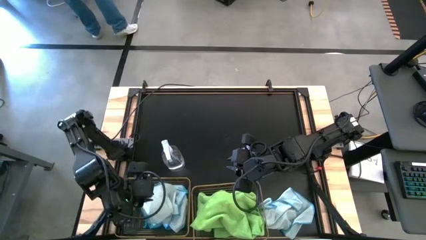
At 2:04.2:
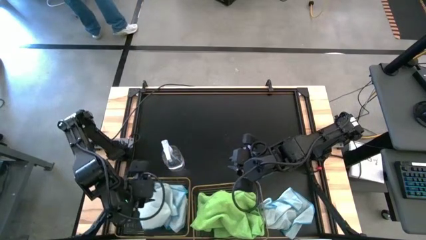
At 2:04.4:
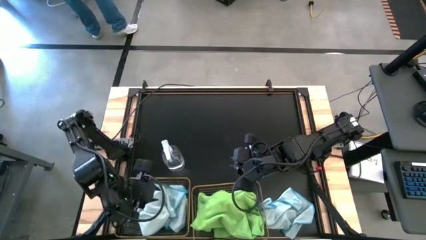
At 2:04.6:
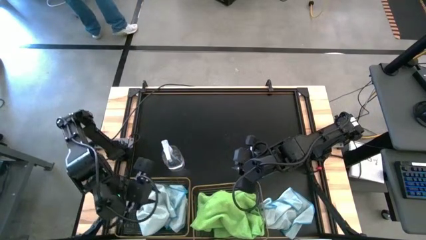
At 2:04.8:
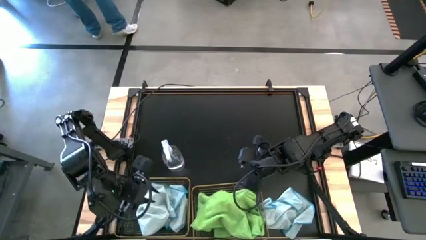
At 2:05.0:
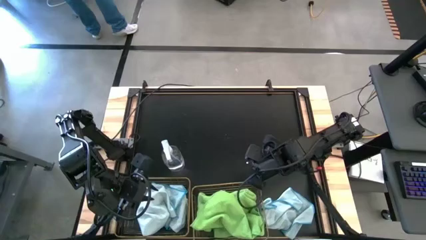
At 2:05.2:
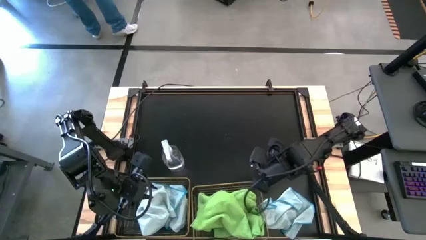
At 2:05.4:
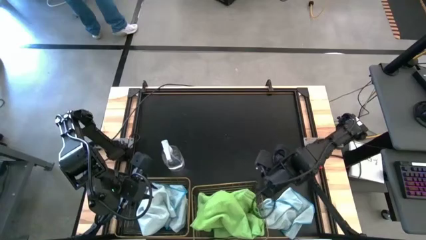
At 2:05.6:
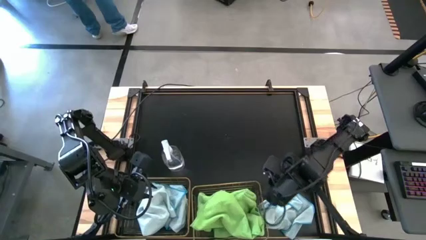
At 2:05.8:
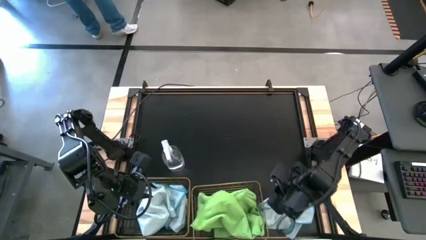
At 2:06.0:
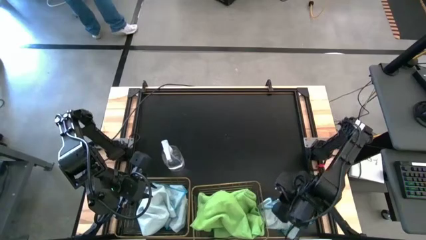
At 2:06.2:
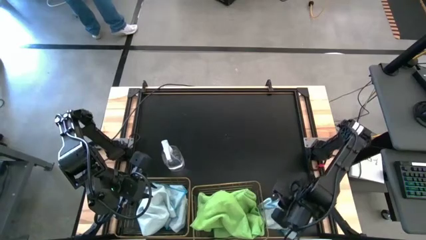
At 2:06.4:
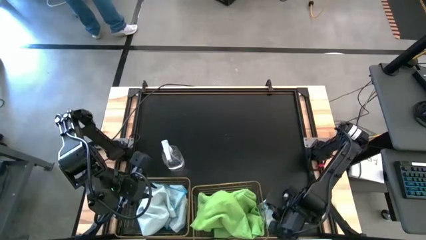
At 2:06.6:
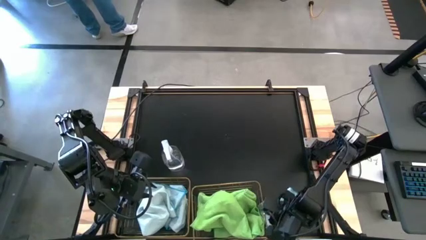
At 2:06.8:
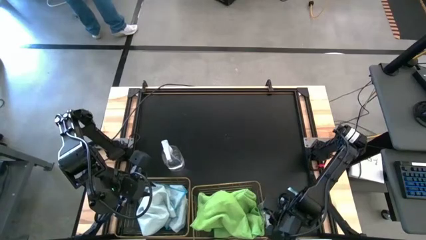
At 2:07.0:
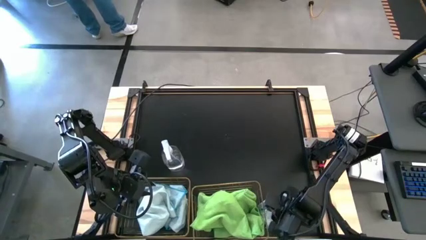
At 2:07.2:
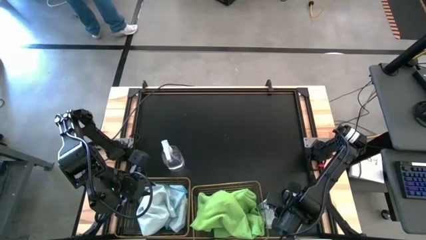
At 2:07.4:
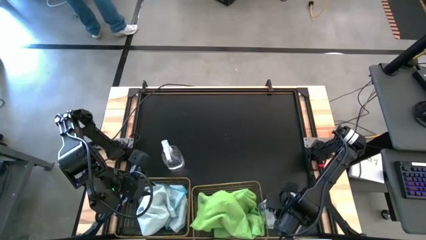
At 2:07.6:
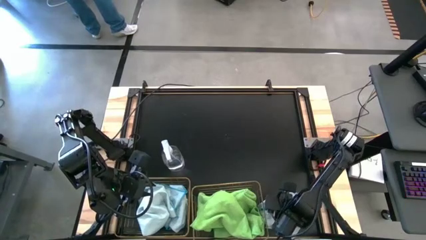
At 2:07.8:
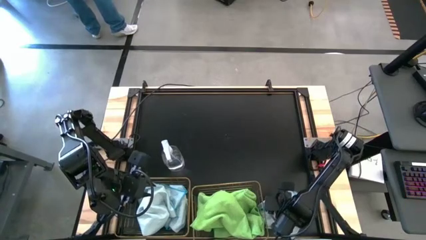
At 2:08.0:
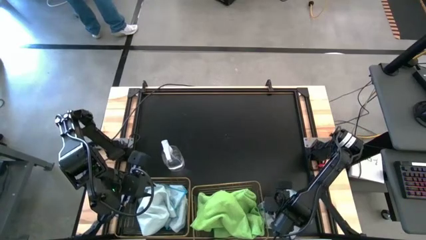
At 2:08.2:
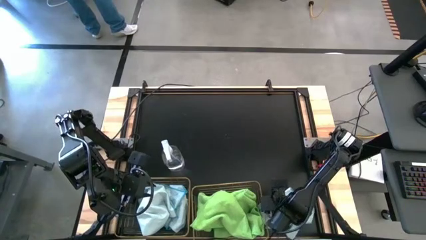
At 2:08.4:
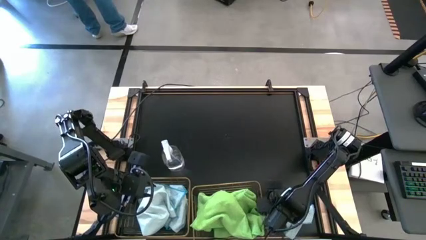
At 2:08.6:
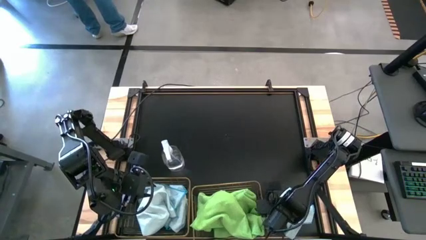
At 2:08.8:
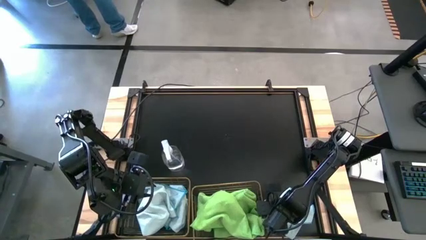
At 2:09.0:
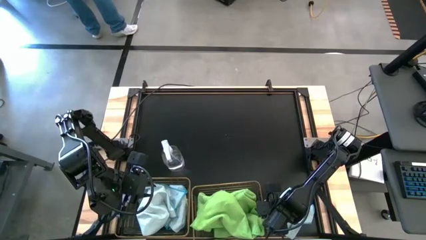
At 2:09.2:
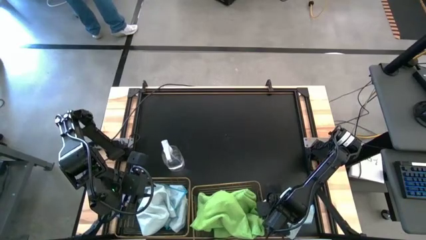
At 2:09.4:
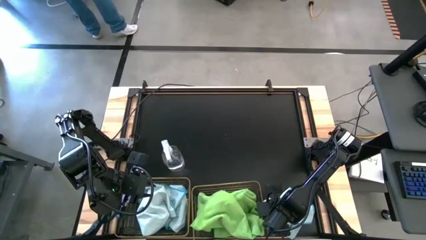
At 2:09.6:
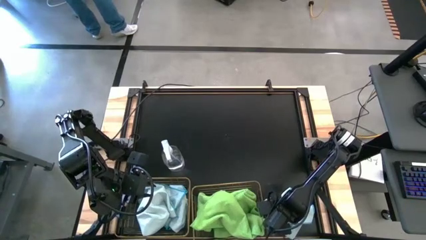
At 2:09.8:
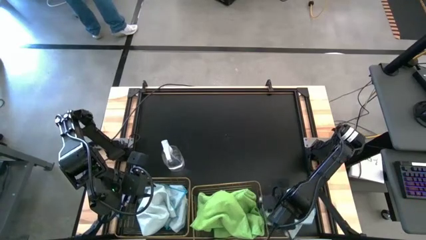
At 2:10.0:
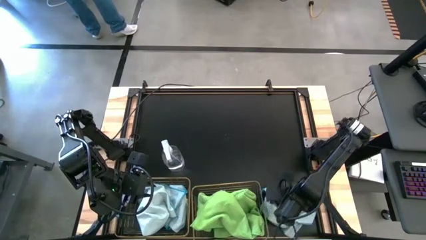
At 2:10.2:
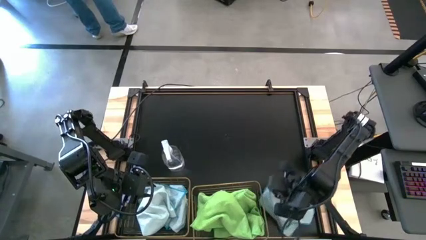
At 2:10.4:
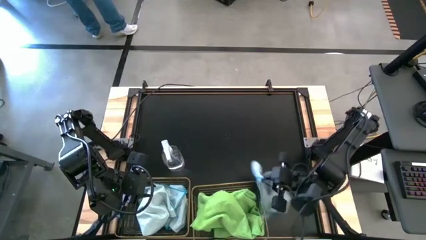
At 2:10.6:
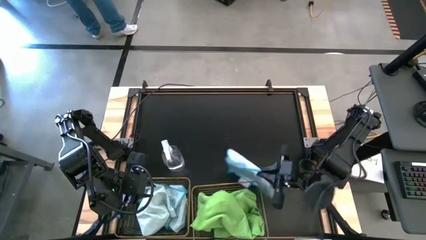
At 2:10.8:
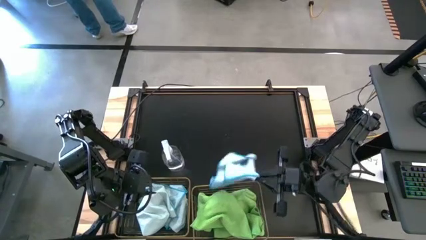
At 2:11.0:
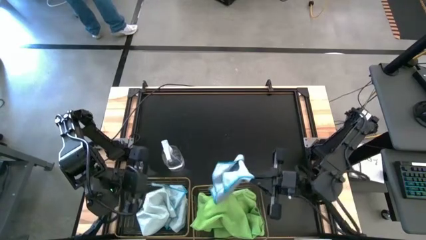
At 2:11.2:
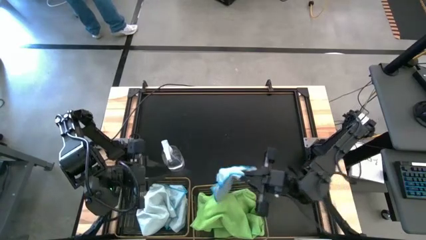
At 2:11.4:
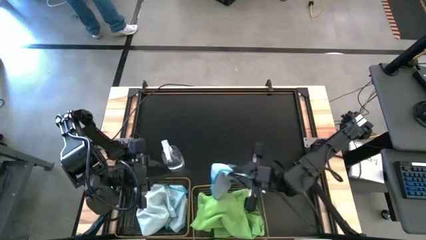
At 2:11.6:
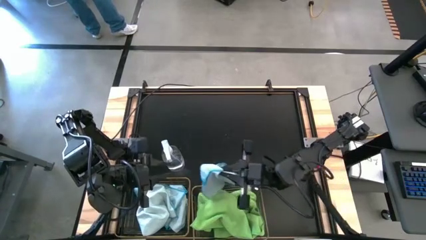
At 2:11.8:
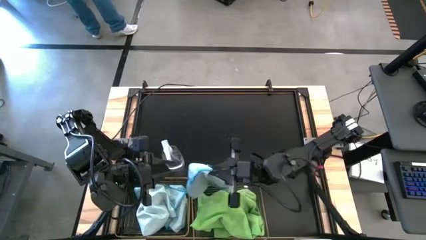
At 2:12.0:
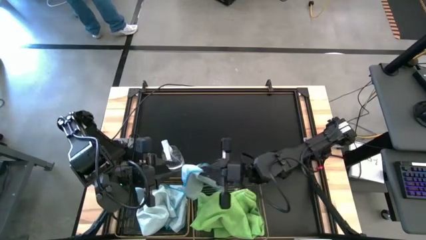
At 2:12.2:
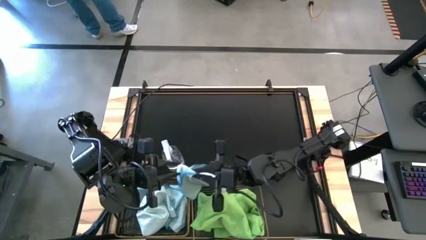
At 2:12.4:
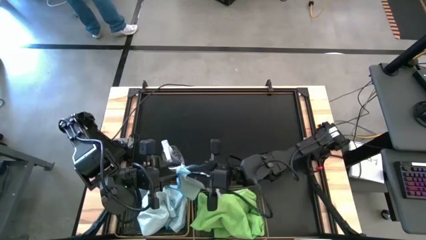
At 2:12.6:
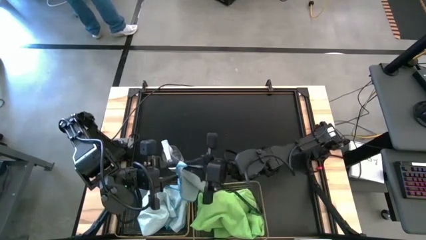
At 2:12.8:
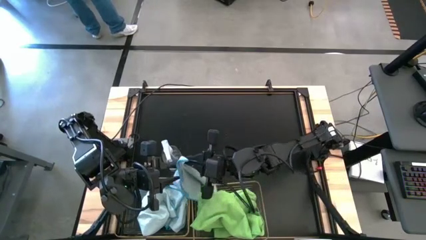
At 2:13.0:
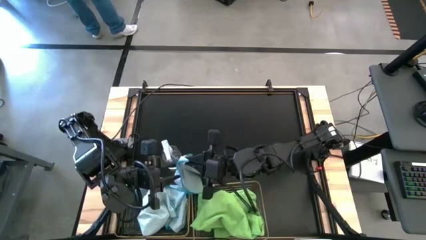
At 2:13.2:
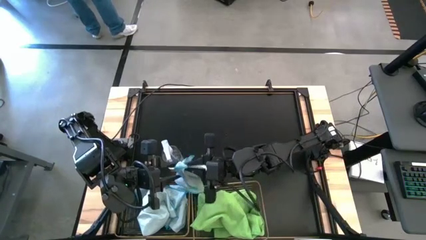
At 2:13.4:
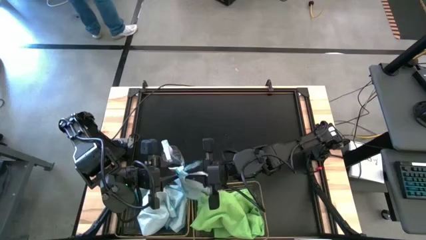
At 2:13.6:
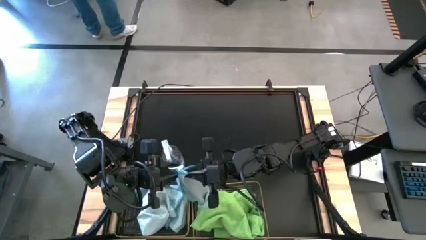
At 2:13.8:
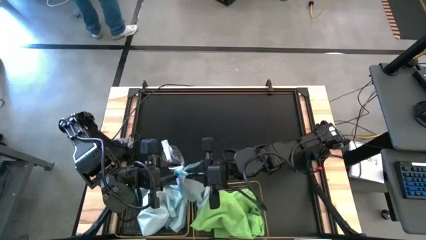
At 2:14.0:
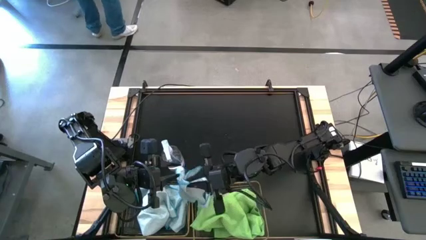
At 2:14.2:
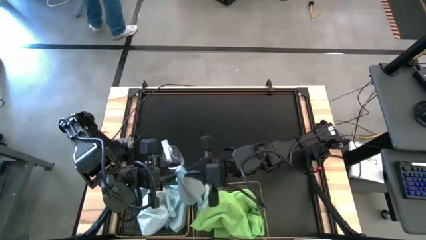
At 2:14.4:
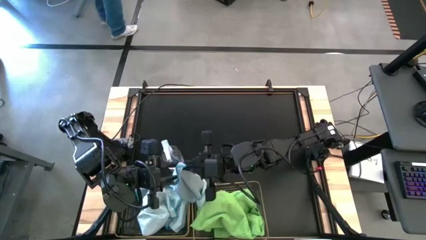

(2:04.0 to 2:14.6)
Task: Sort microfiber towel by color & place in baskets
Put the white microfiber cloth into the left wire basket

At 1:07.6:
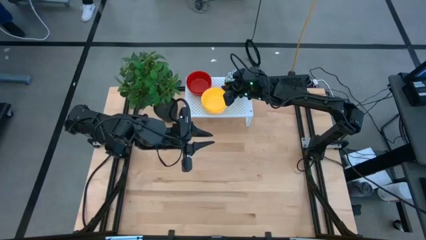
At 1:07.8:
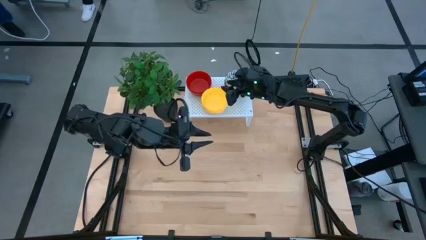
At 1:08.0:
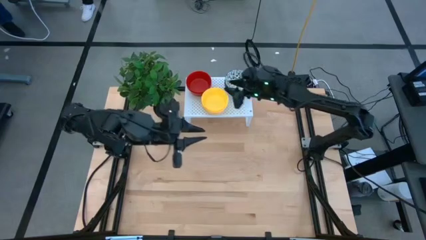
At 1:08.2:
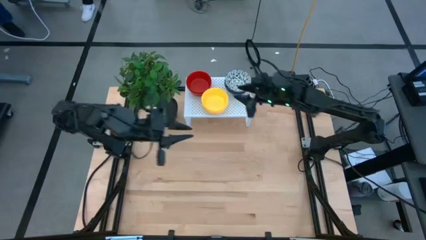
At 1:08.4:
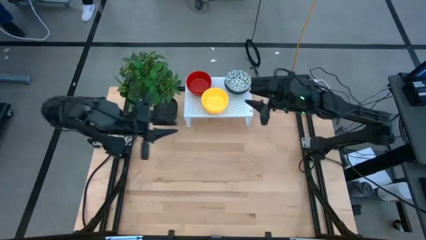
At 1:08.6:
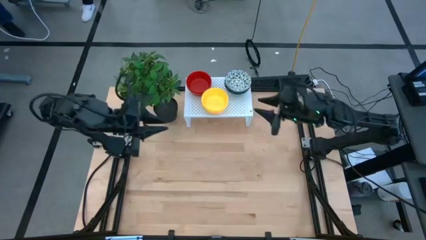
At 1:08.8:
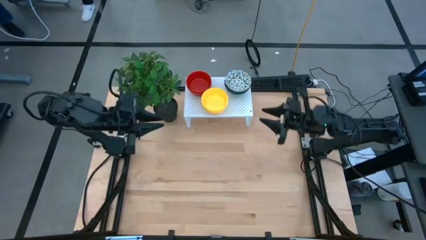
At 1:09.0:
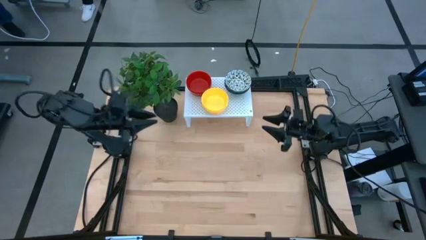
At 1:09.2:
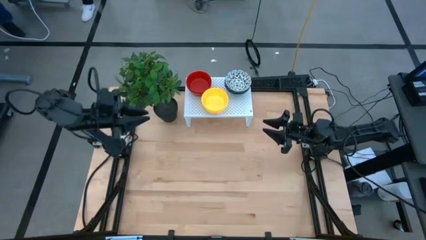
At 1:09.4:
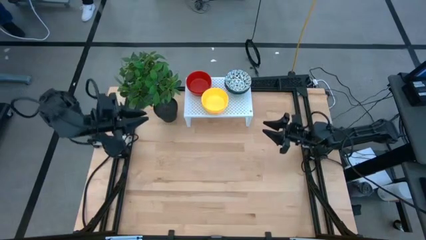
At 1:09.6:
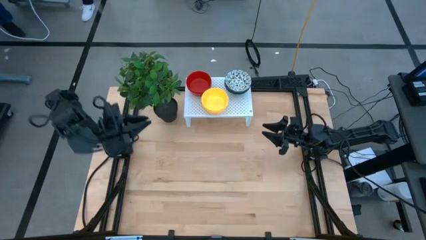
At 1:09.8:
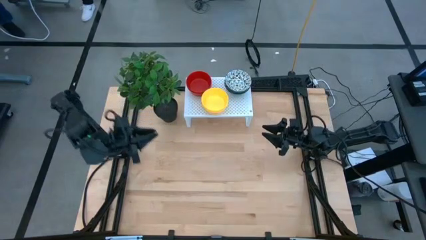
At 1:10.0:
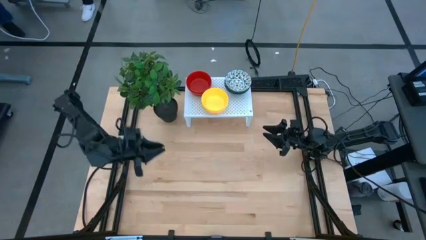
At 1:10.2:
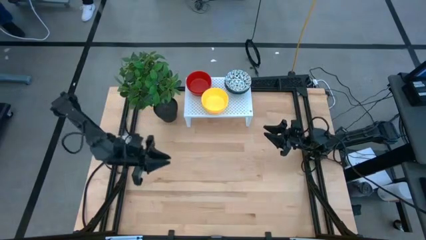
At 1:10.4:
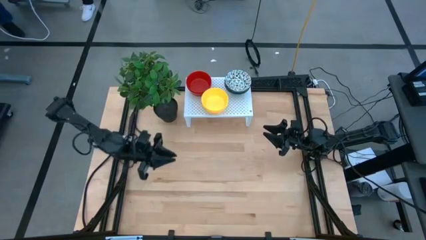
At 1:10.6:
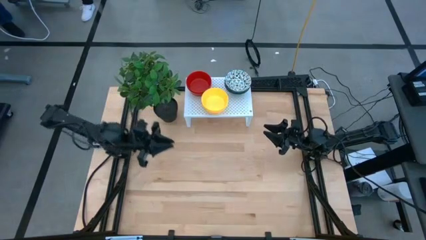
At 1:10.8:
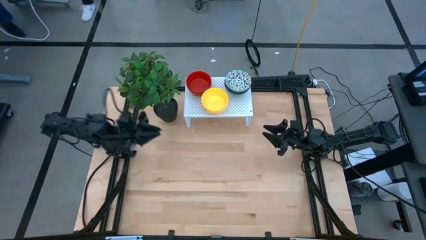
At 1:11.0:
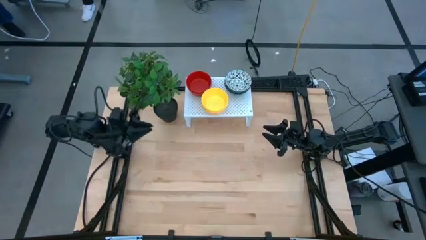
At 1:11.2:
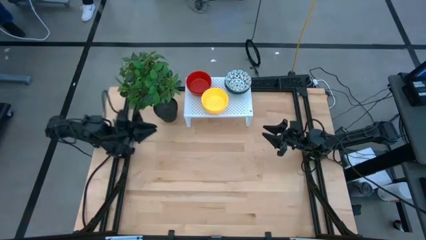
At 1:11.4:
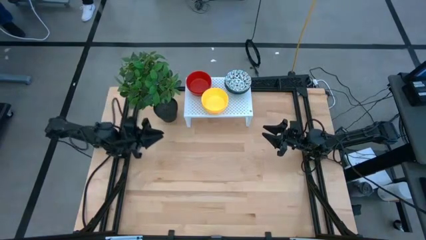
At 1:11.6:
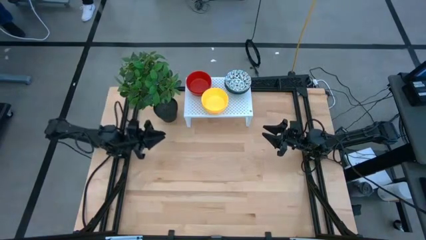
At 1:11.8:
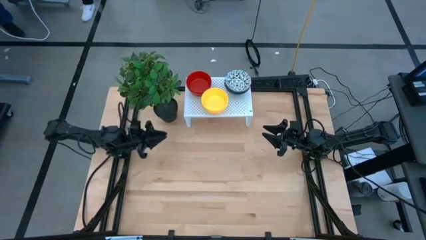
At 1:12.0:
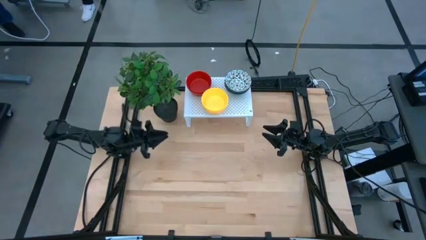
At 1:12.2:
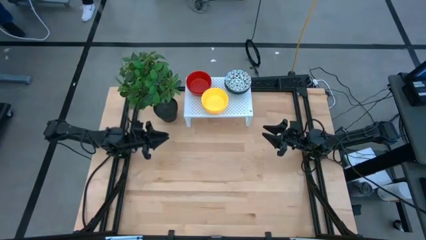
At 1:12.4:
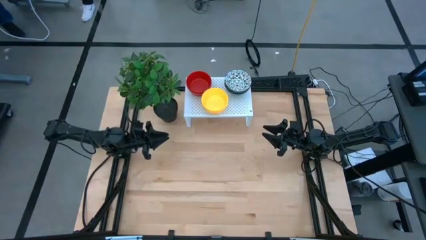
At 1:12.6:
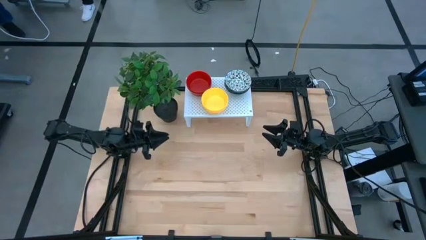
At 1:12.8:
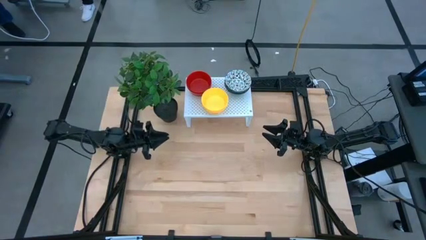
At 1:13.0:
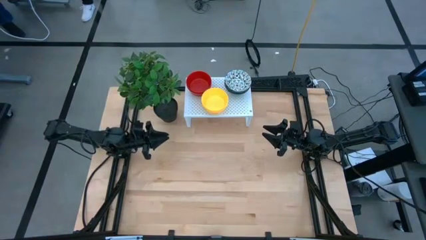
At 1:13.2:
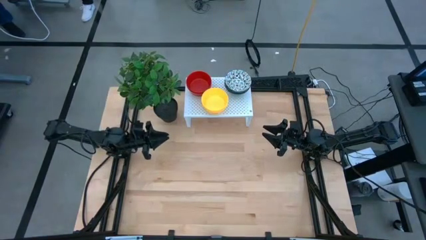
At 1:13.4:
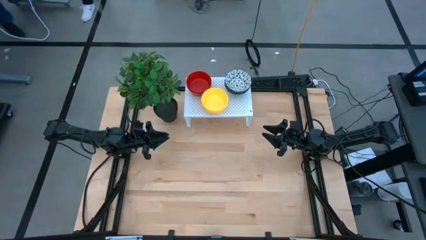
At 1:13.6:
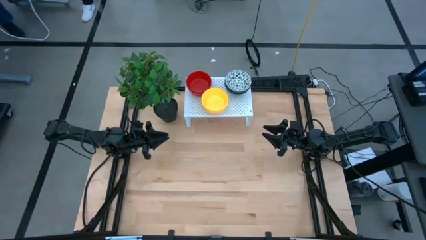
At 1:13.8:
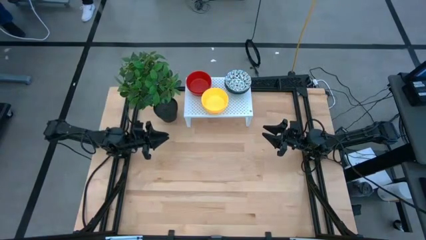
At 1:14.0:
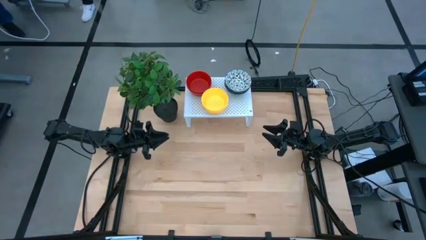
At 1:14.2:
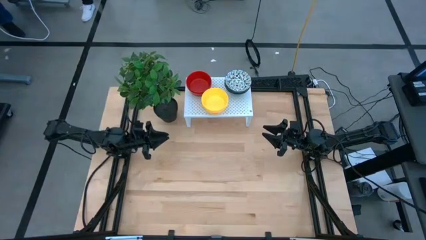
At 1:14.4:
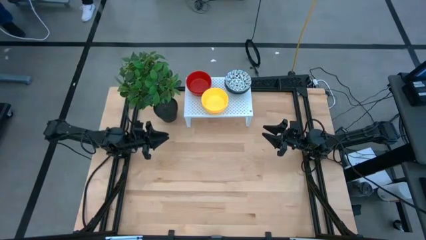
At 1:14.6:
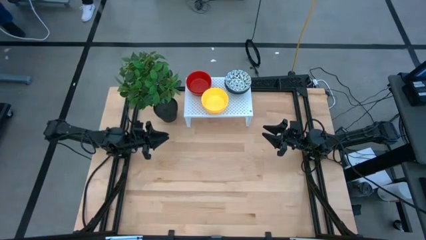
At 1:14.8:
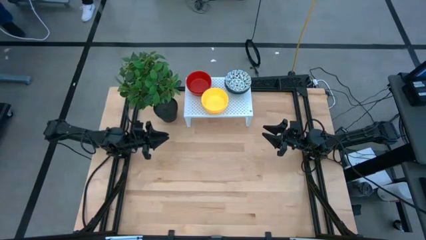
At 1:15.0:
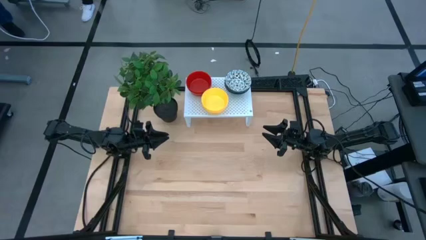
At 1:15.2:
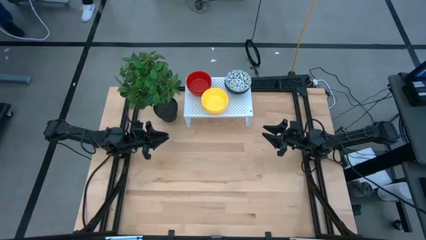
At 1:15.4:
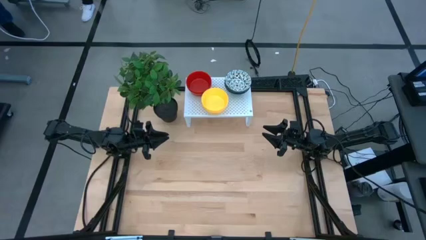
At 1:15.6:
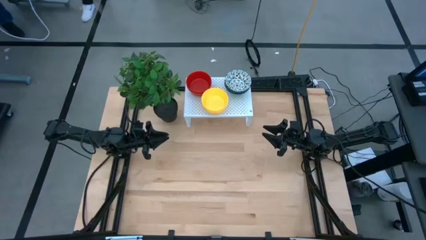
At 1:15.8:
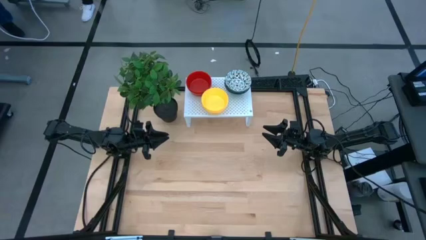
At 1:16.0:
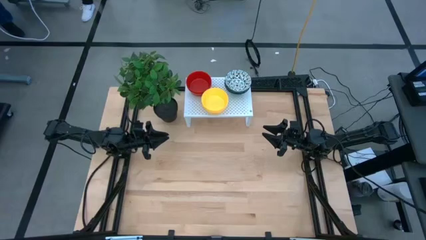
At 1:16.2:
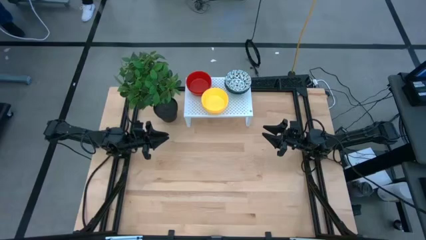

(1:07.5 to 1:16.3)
Task: Pick & Place Mini bowls
Return to Home Position
